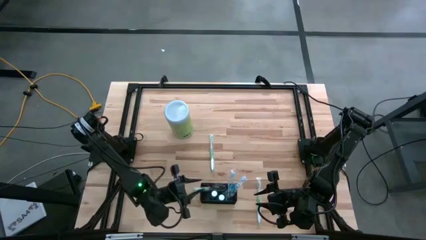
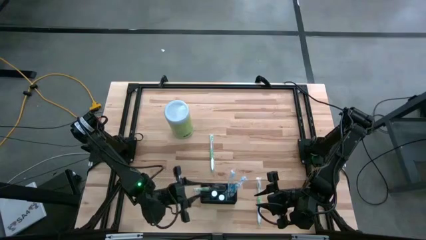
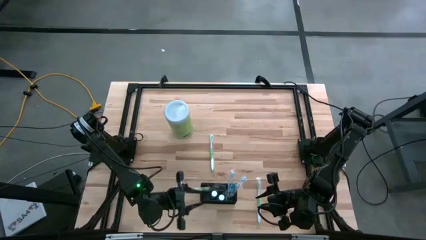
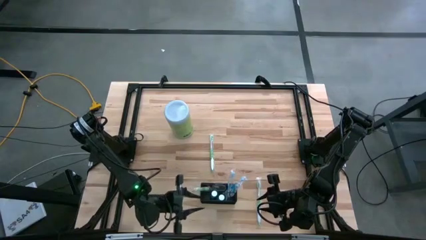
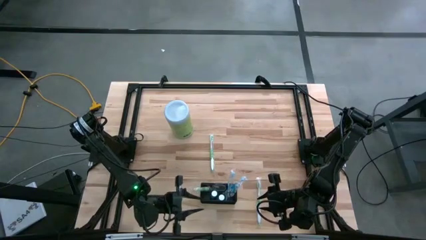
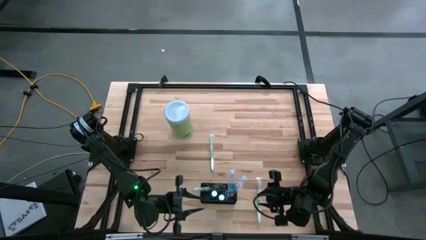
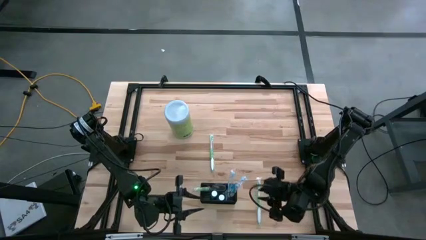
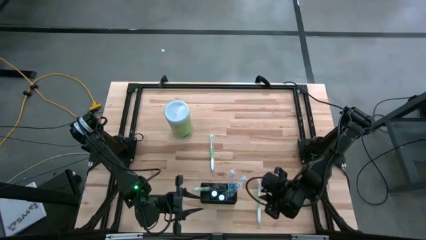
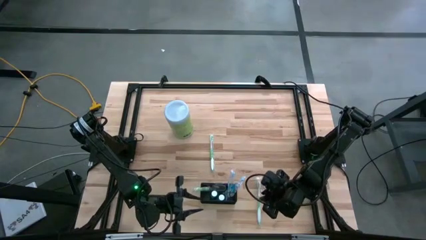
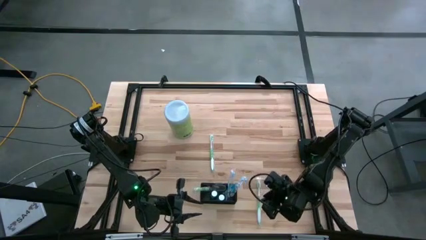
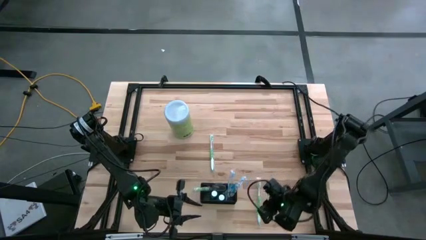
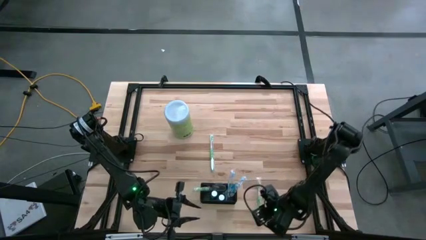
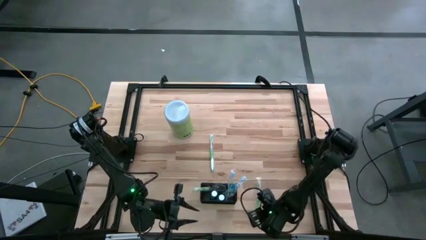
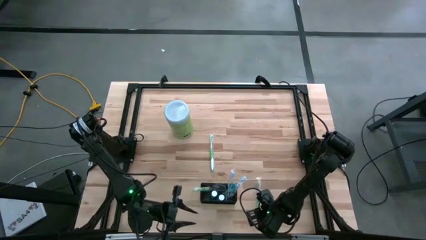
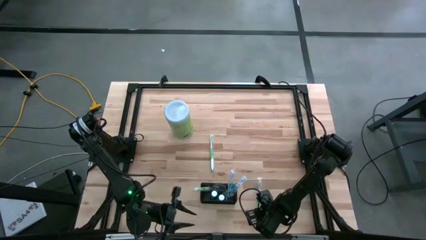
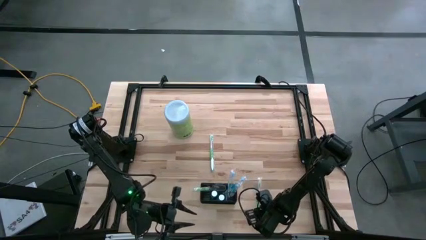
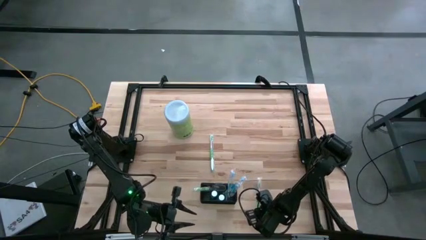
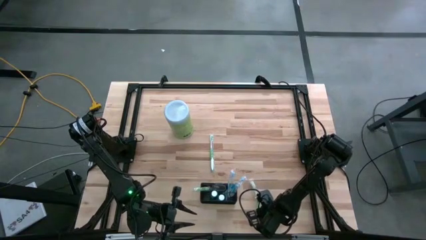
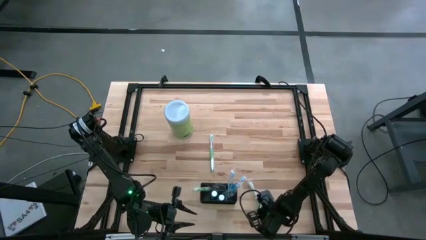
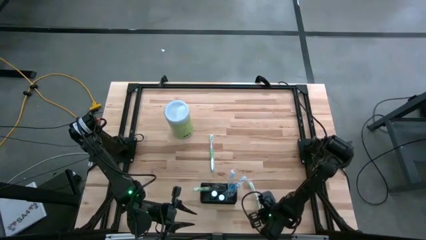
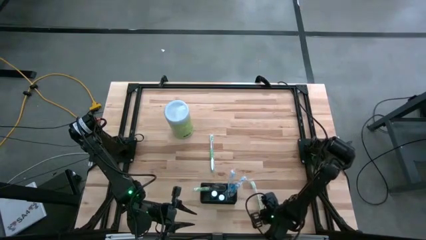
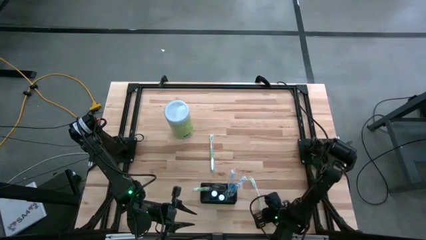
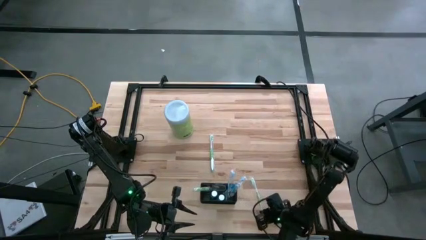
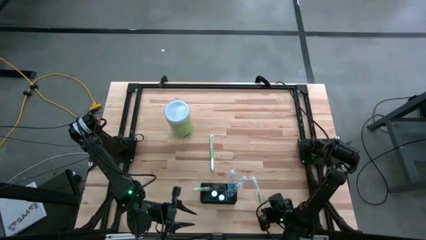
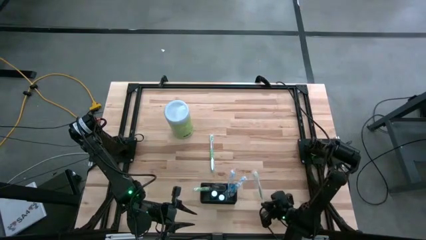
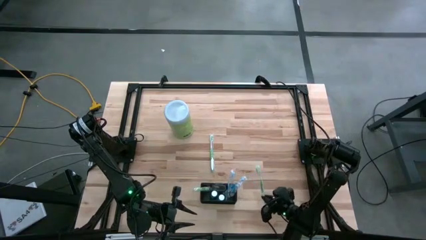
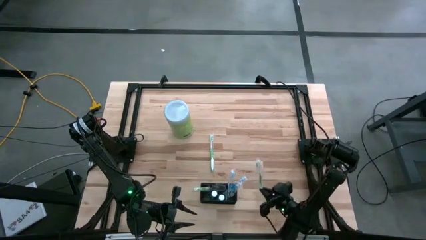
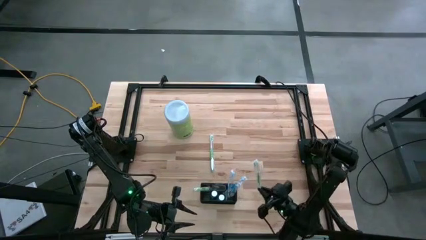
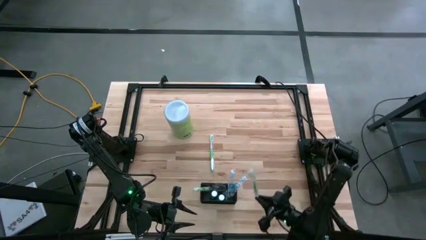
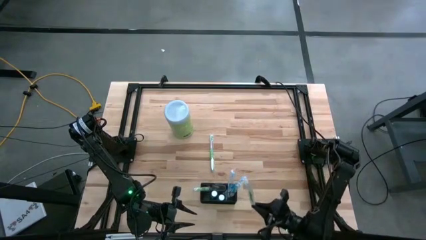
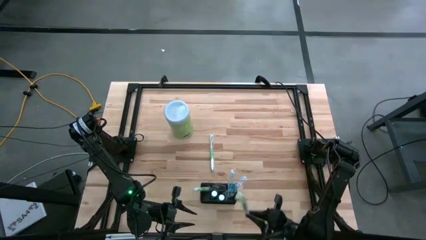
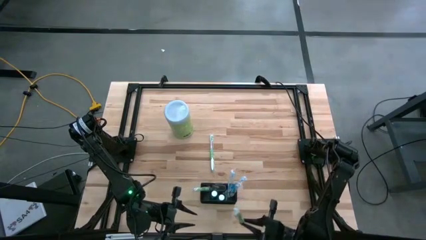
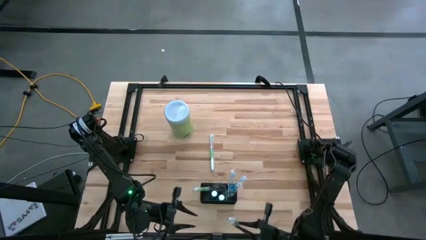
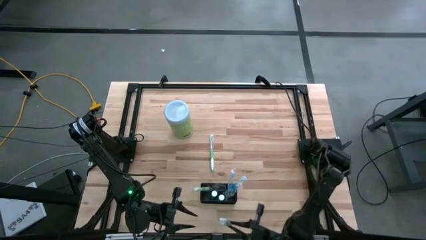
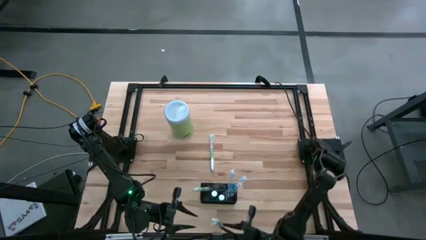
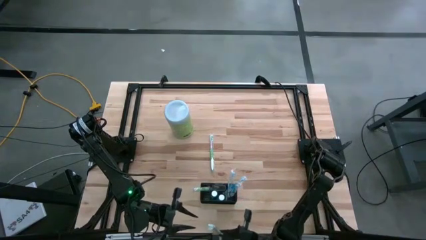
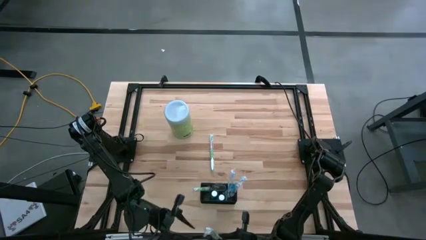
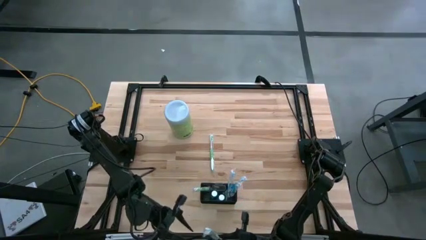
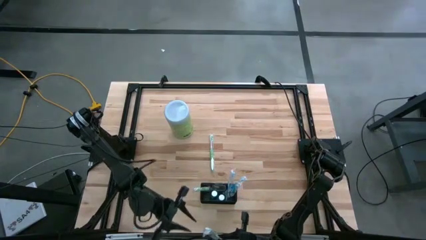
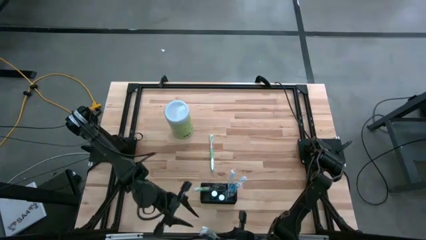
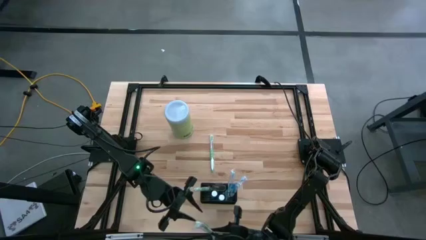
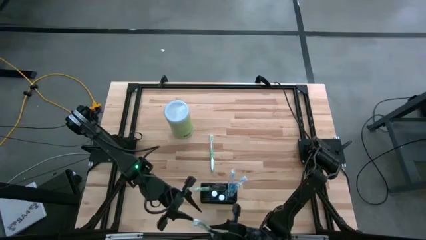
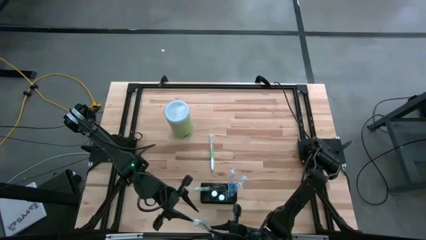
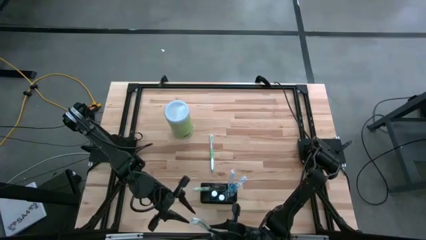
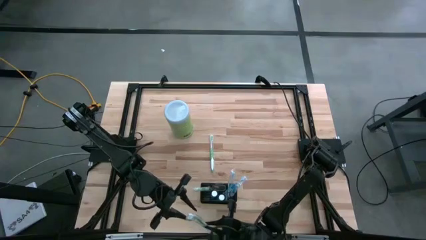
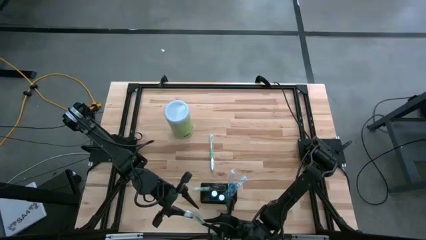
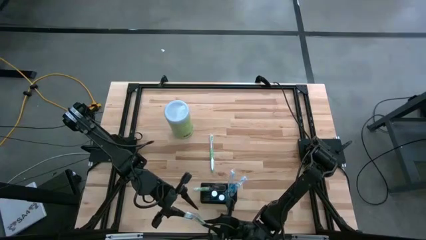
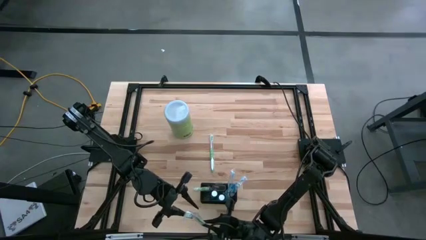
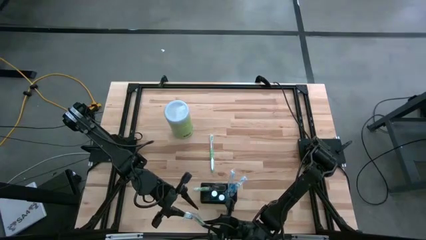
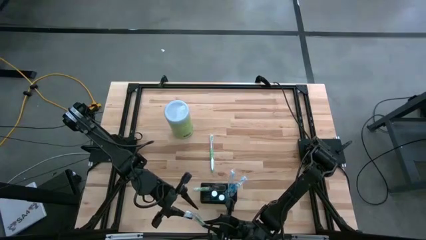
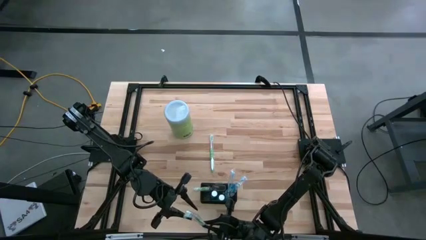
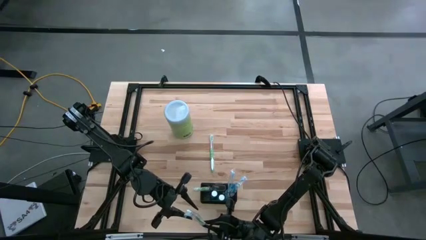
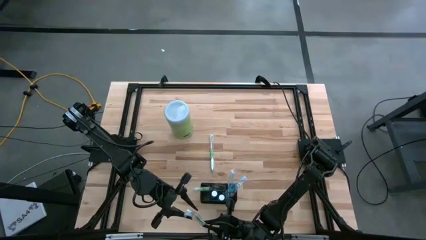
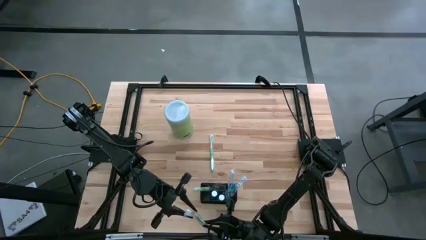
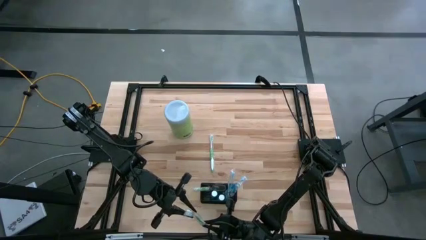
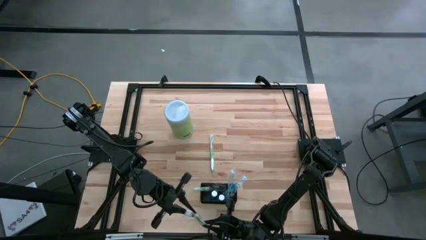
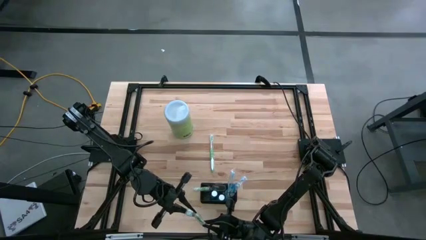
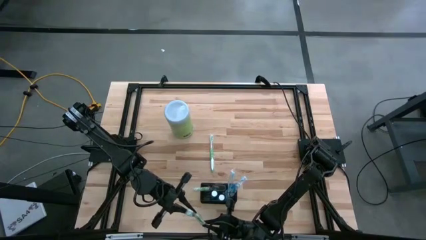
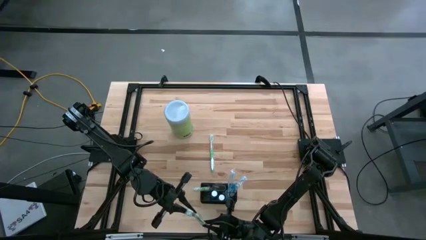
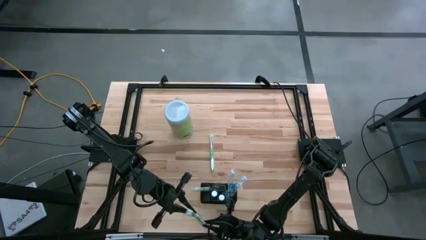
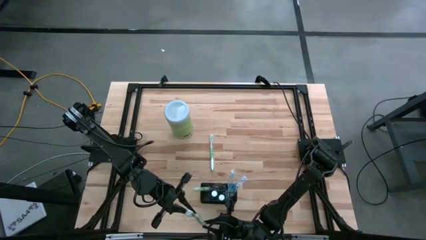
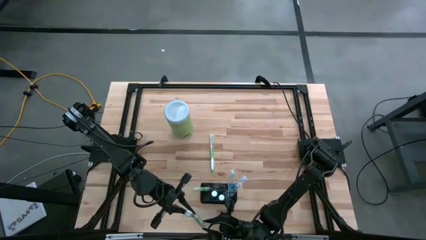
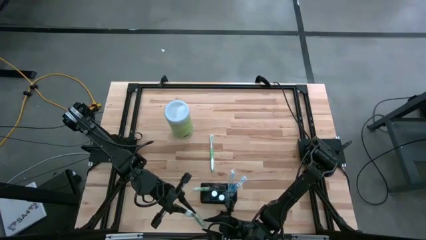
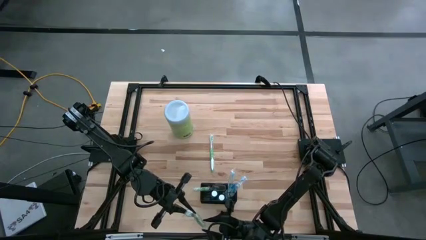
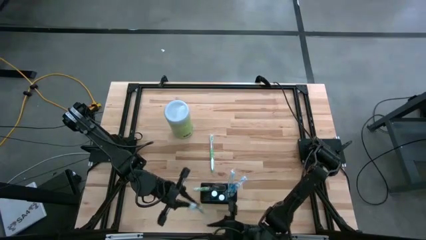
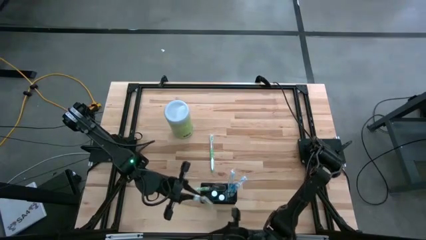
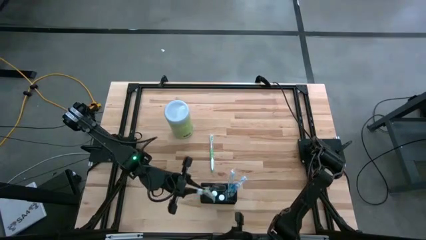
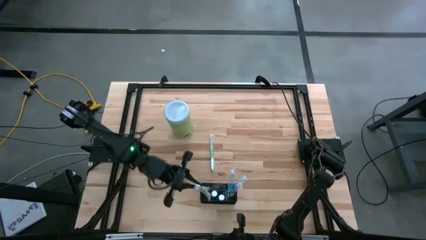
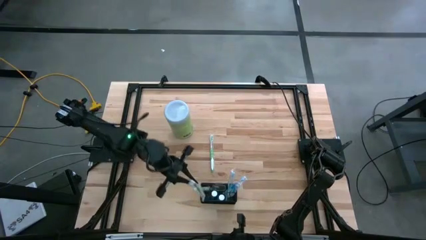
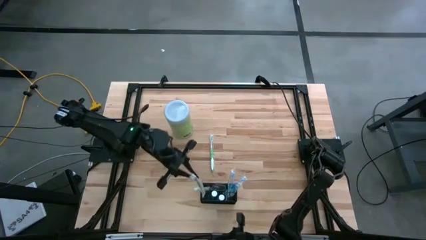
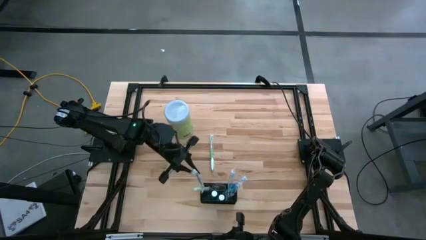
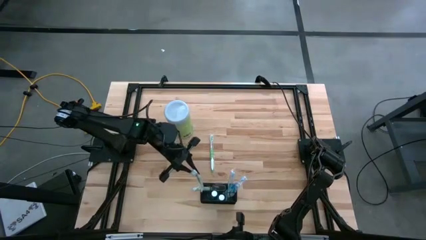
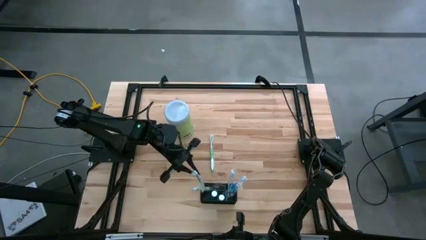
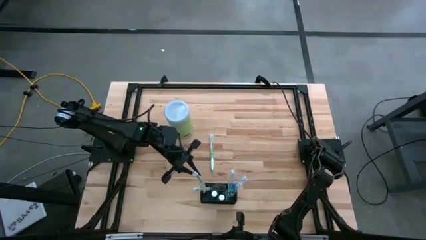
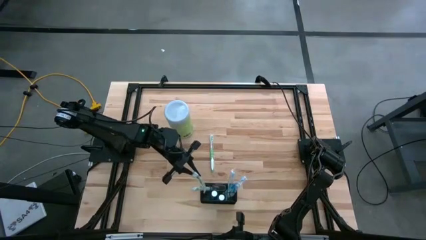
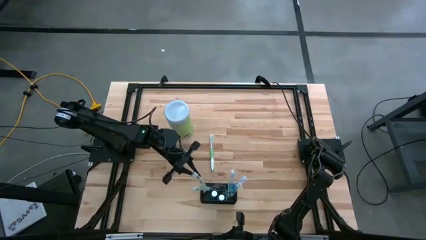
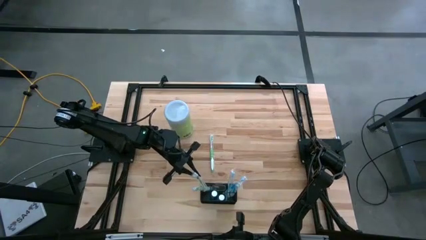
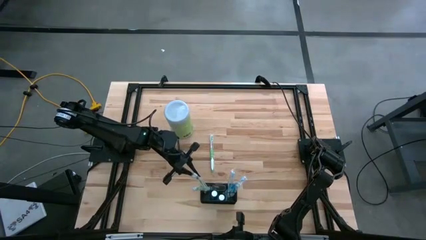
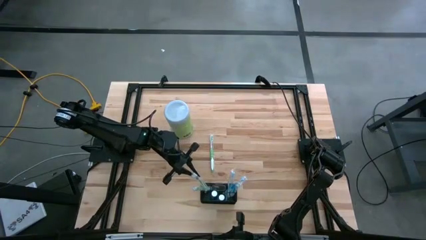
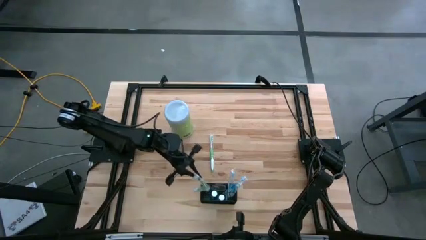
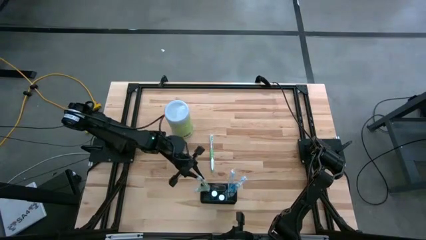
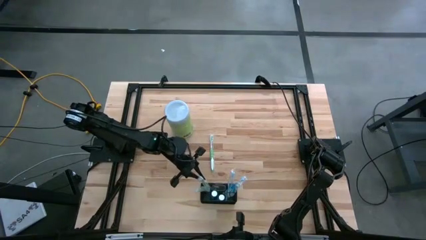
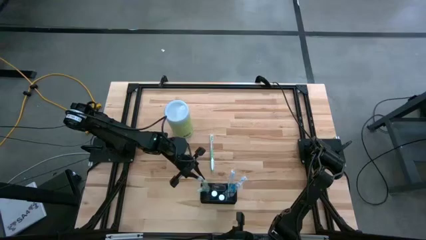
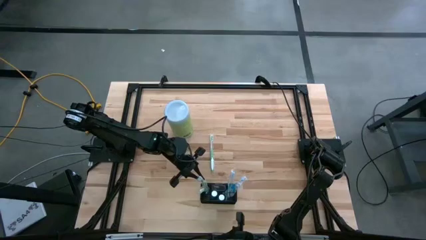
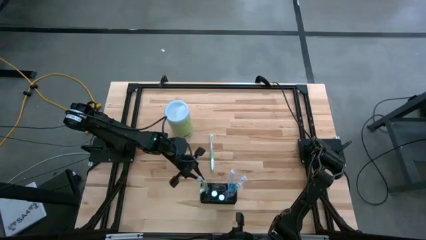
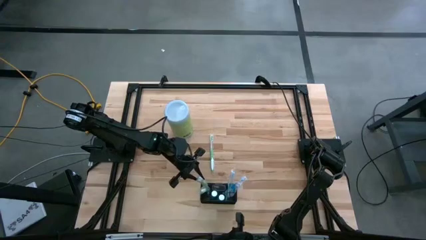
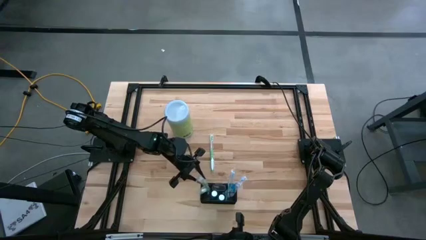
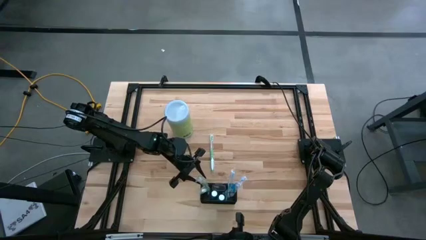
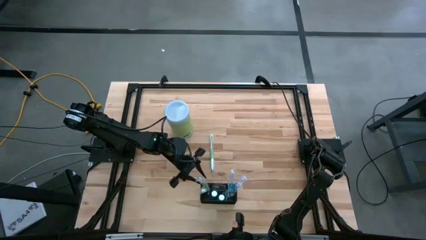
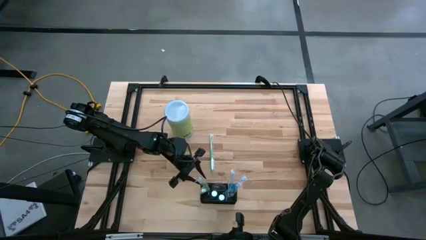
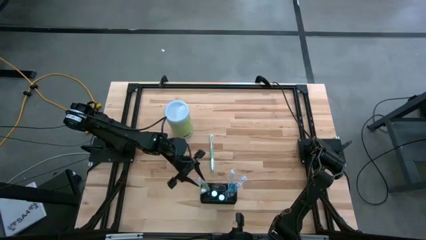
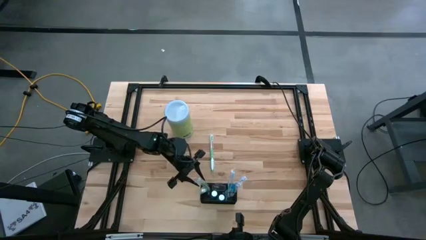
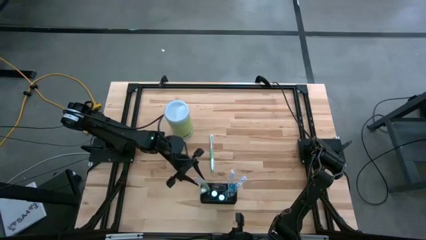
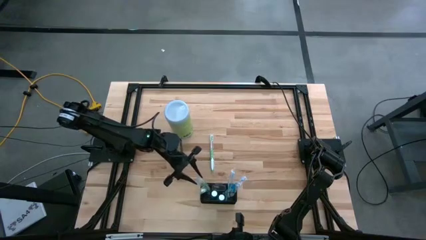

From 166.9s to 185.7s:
Task: Pick & Place toothbrushing station
Put the bottom green toothbrush into the mesh organizer
